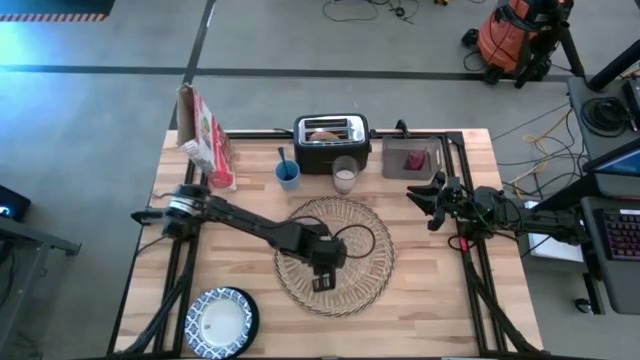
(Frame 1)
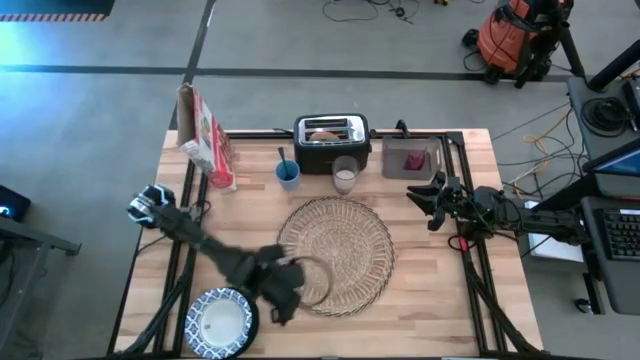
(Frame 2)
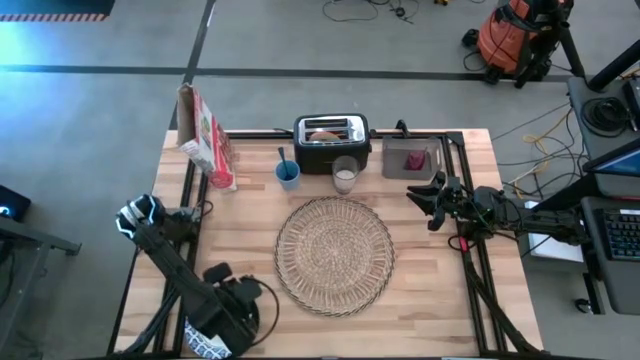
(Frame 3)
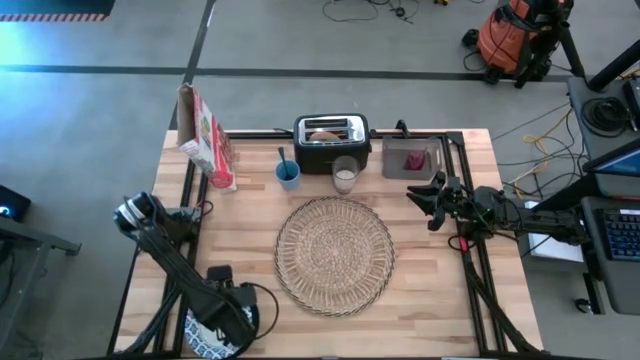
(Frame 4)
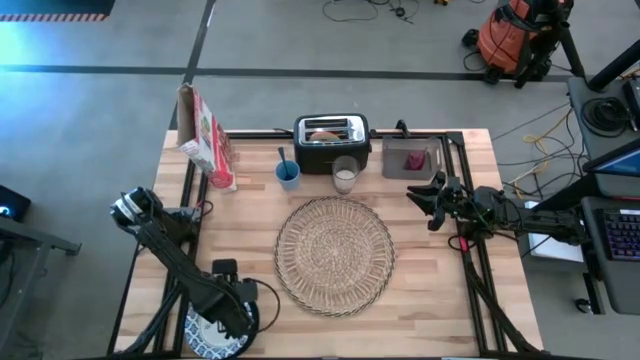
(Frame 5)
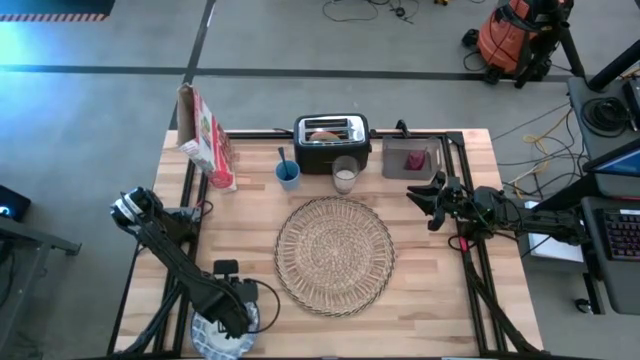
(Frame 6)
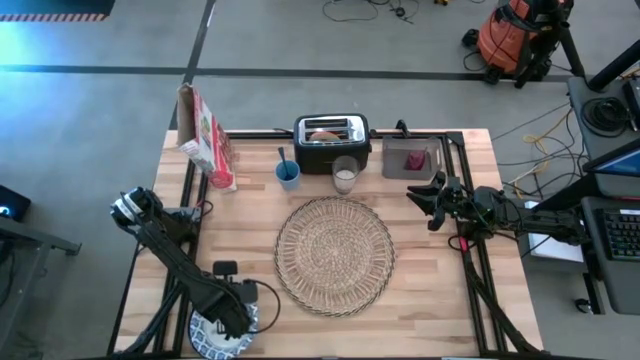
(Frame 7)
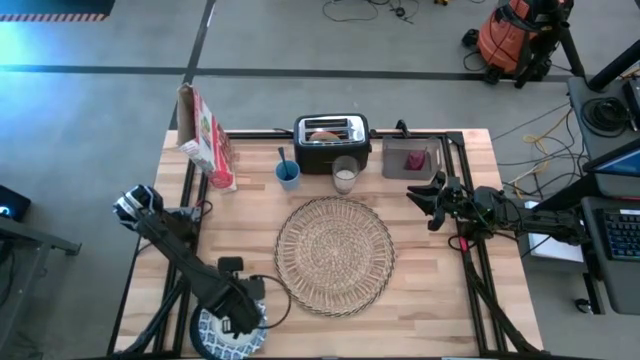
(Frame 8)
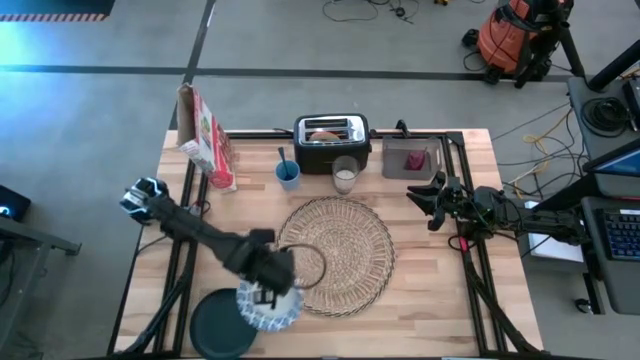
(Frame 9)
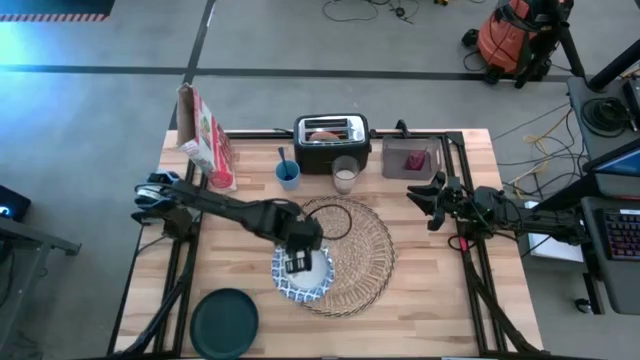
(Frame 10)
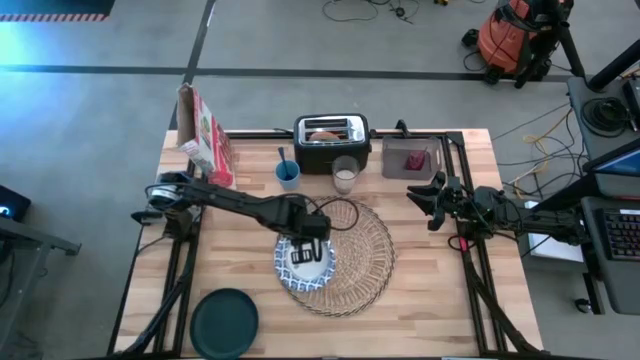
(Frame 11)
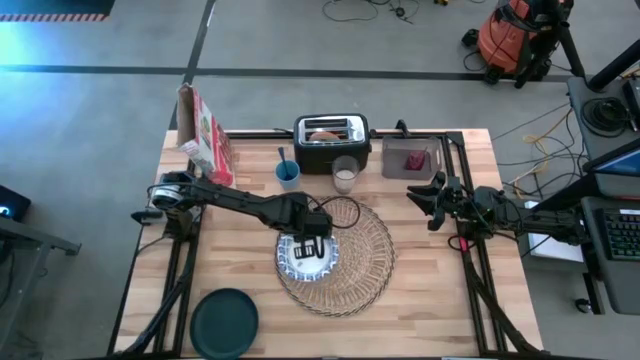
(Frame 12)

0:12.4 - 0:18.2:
Task: Arrange a breakfast setting
Put the white bowl on the brown mat

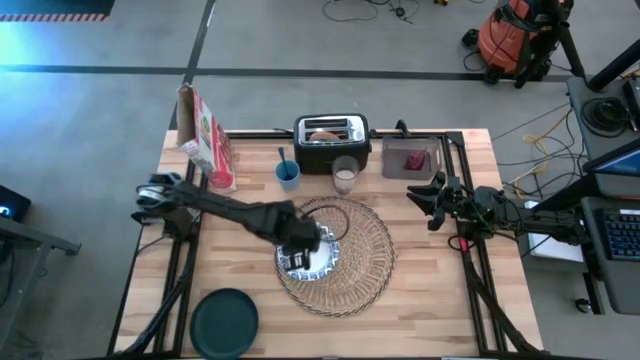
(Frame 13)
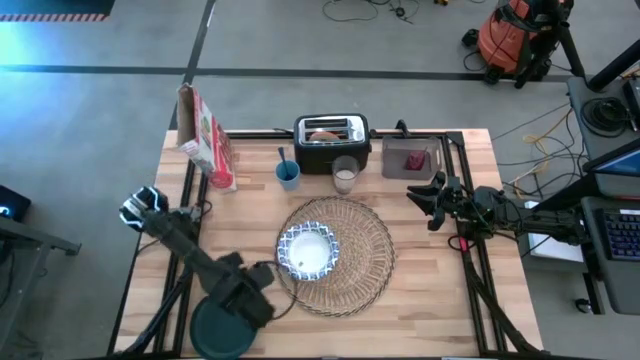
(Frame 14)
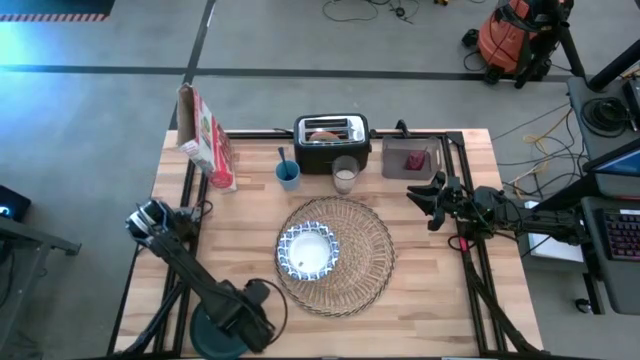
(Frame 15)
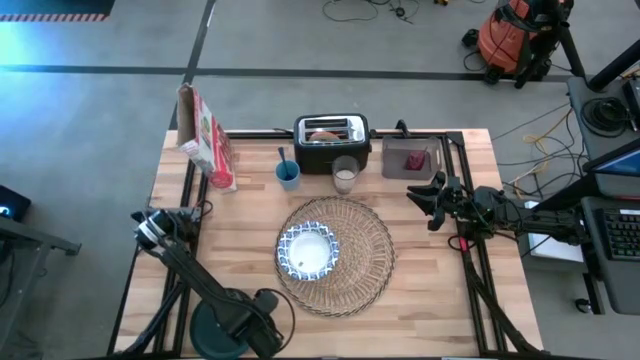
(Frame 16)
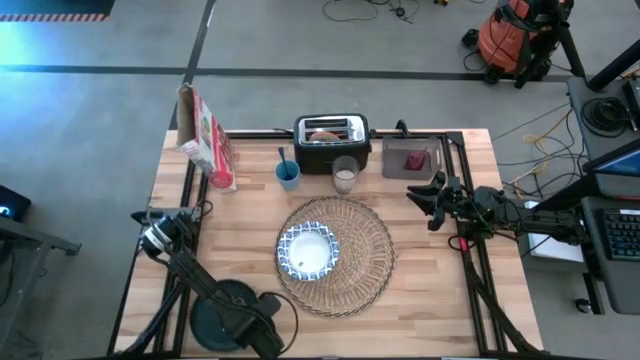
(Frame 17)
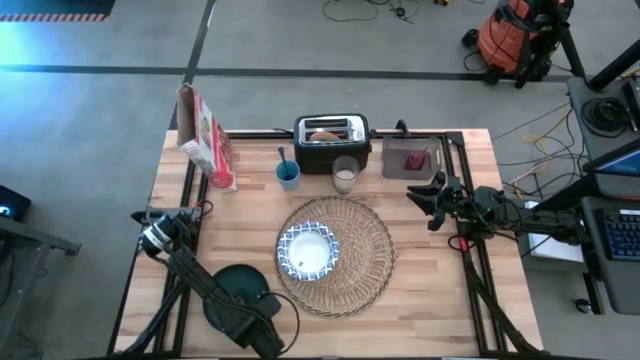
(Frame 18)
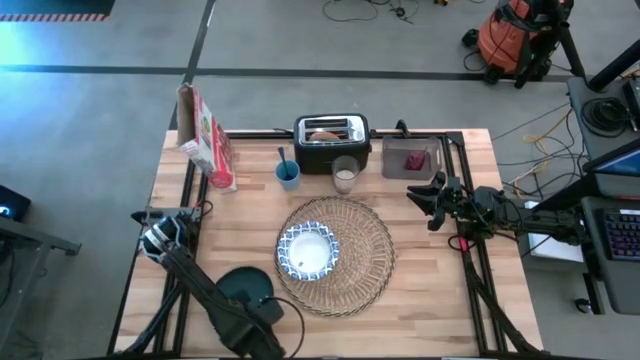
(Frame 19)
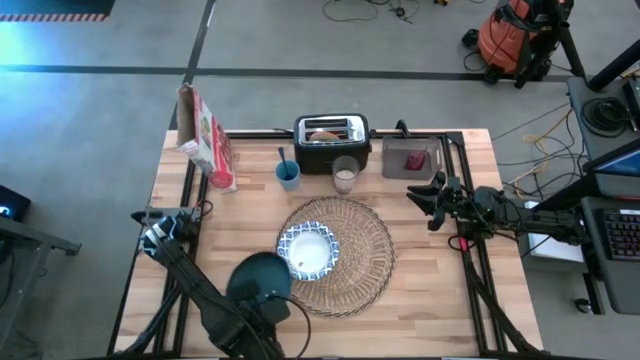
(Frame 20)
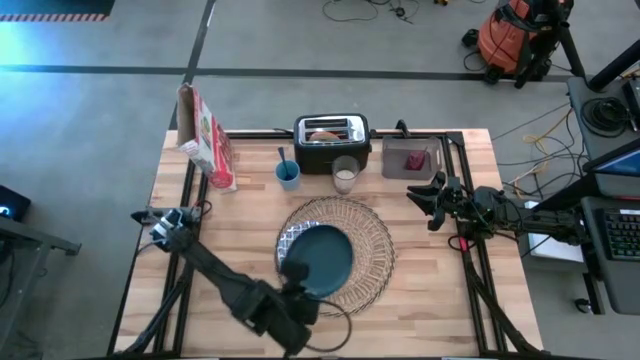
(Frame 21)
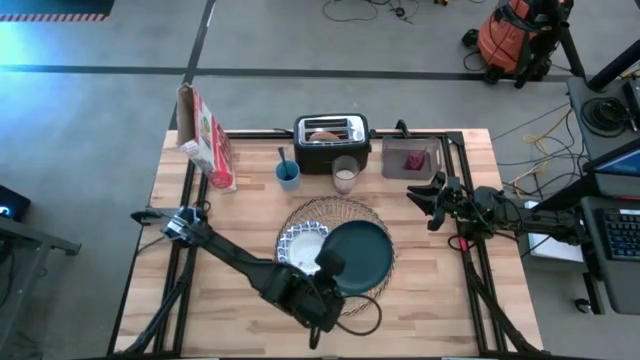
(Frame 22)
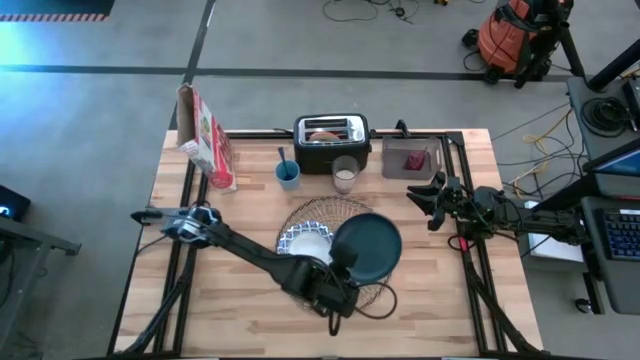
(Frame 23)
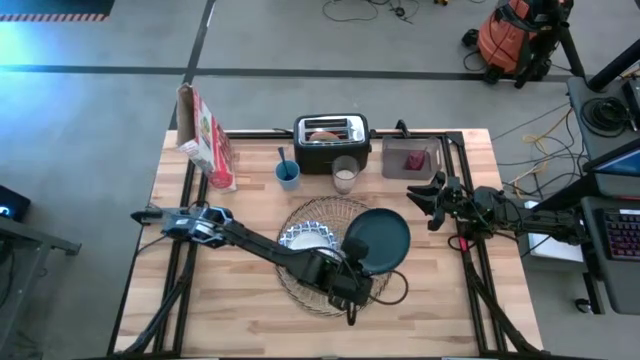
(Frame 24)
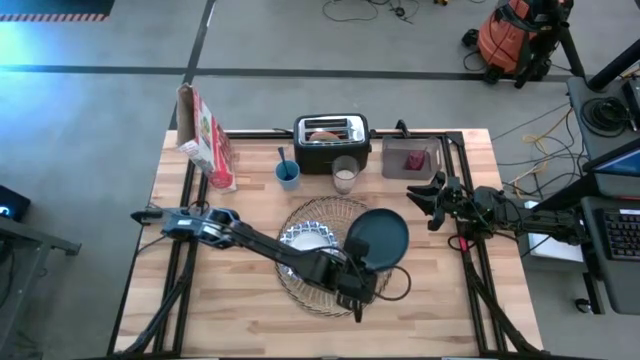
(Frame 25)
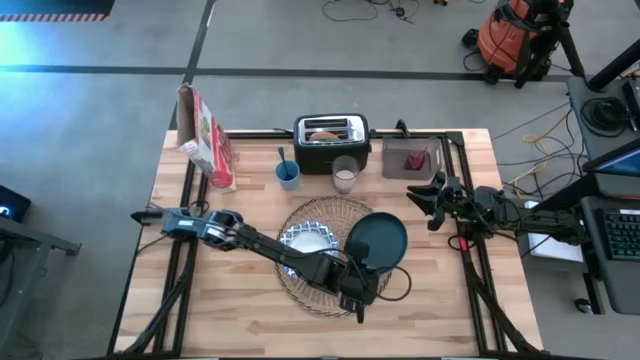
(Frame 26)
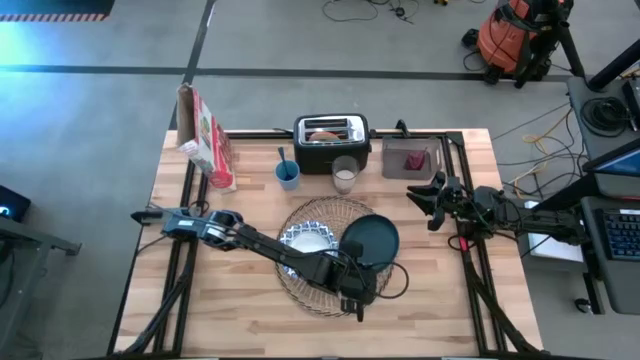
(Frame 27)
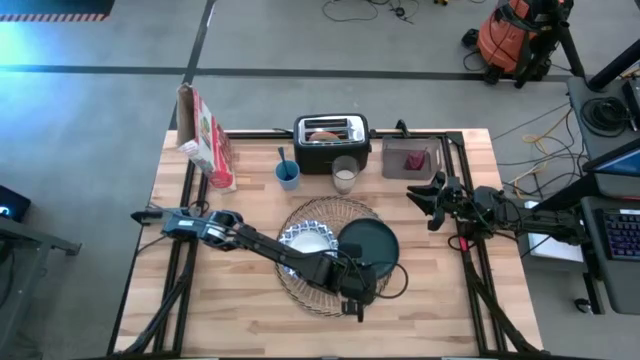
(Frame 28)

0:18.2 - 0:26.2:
Put the black plate on the brown mat

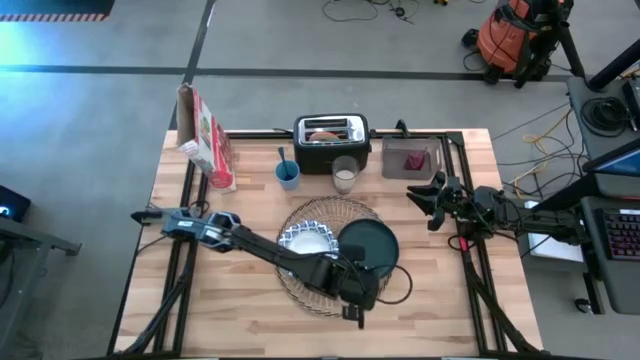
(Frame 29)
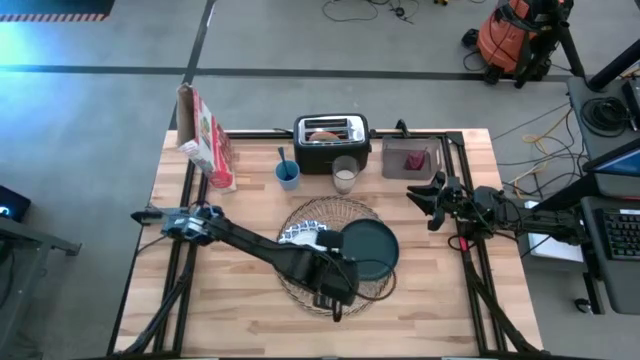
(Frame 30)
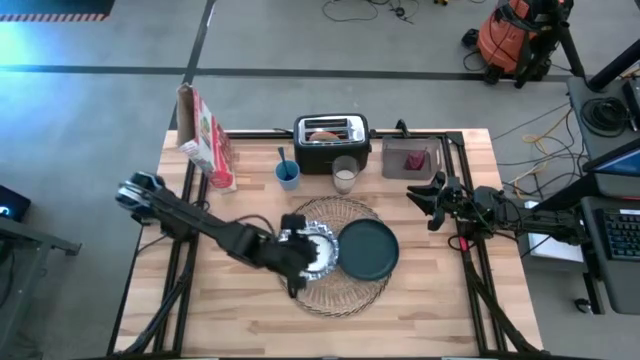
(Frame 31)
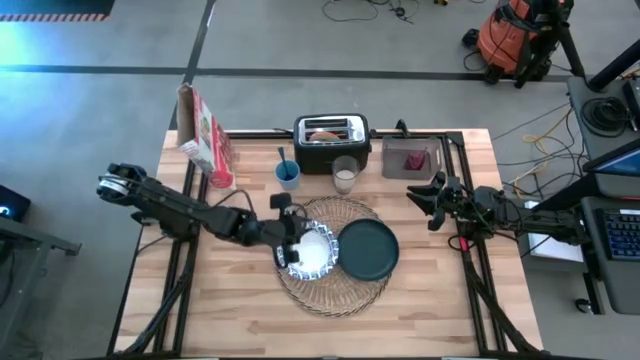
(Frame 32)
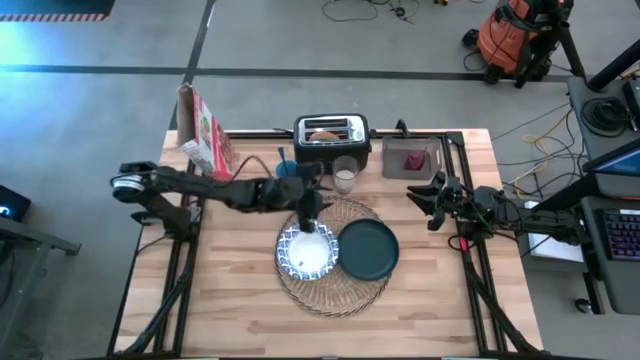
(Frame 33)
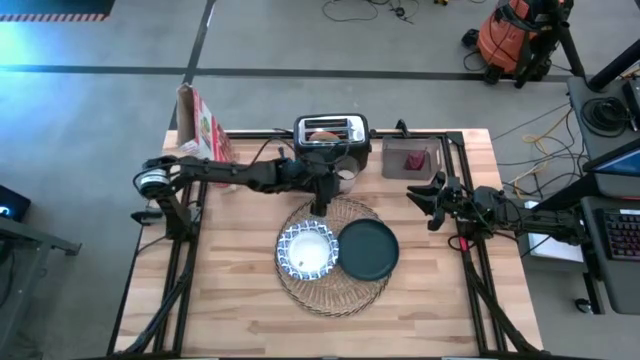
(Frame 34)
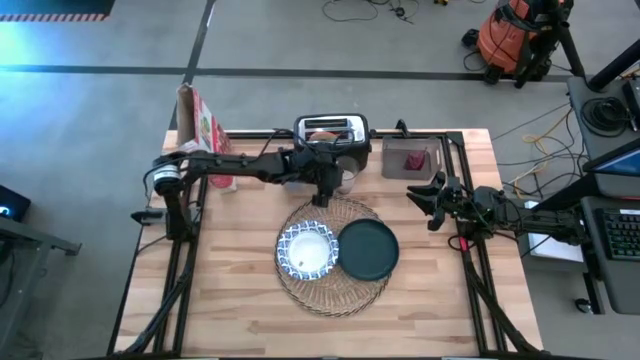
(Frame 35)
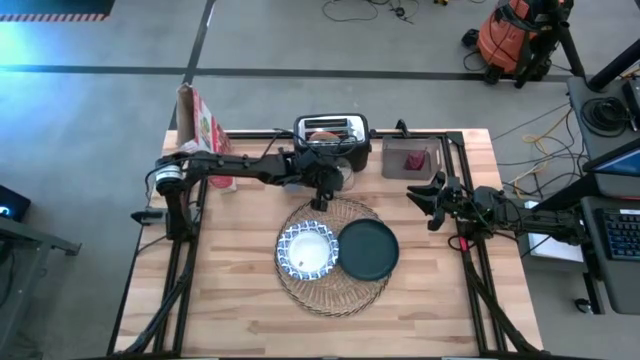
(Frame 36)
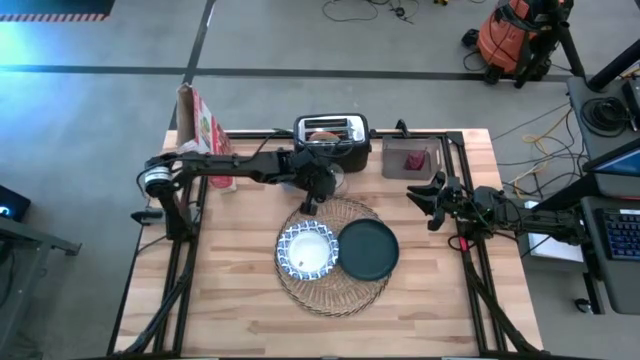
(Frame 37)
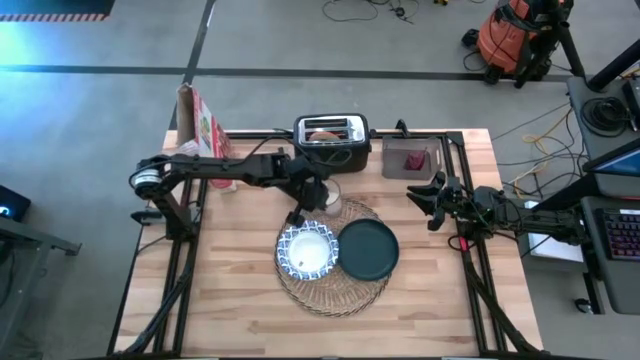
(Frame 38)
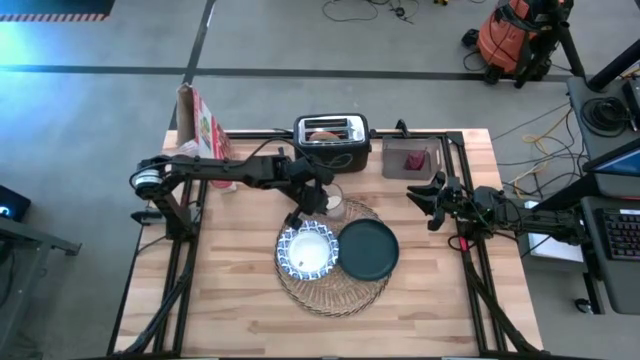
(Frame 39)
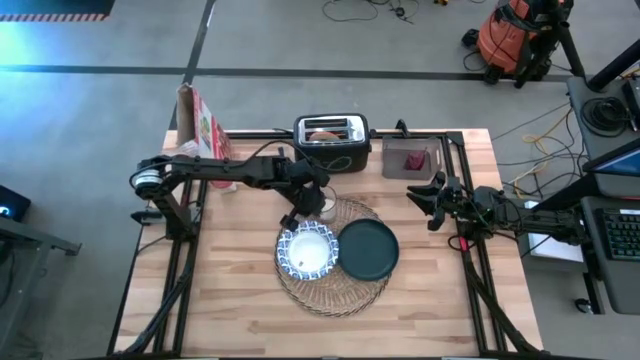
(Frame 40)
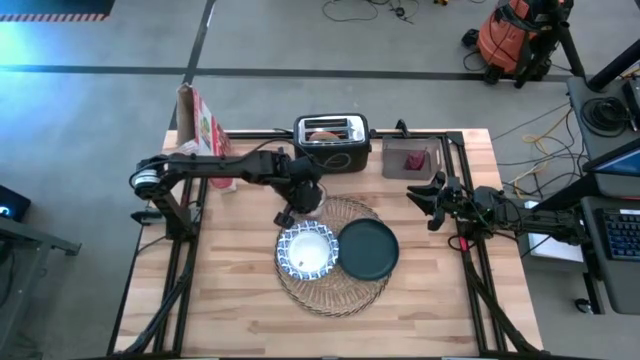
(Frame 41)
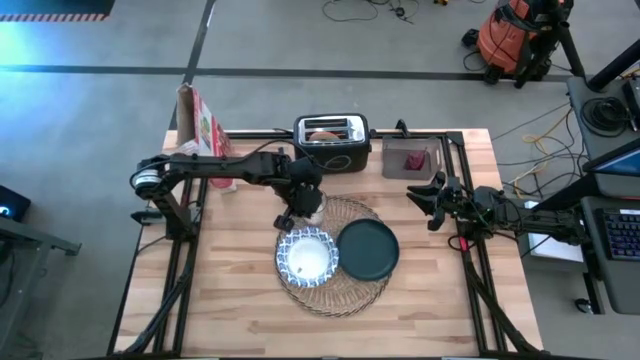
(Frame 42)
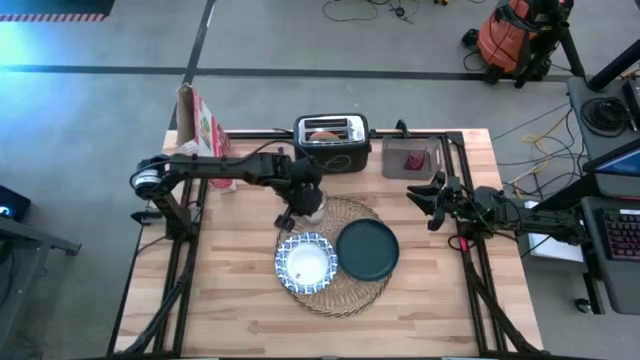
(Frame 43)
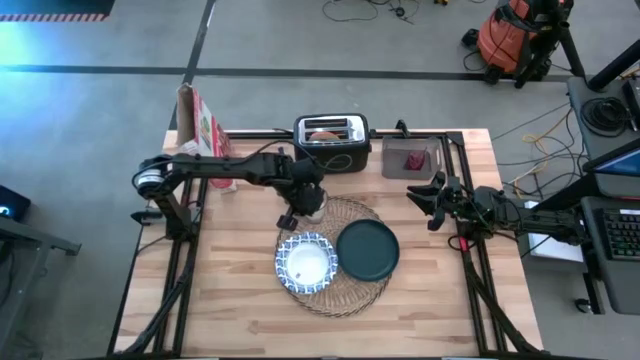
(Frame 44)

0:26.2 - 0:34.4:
Put the transparent cup on the brown mat

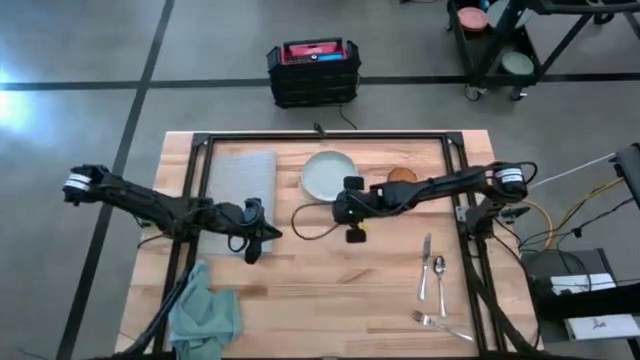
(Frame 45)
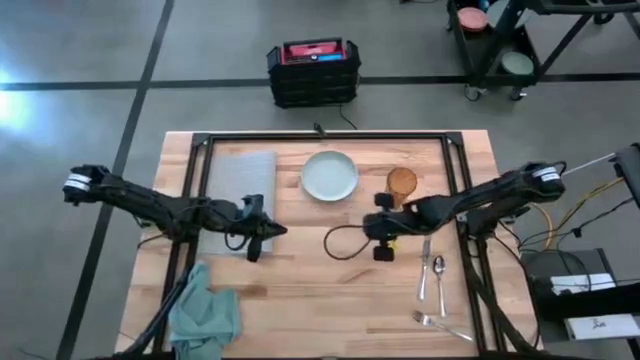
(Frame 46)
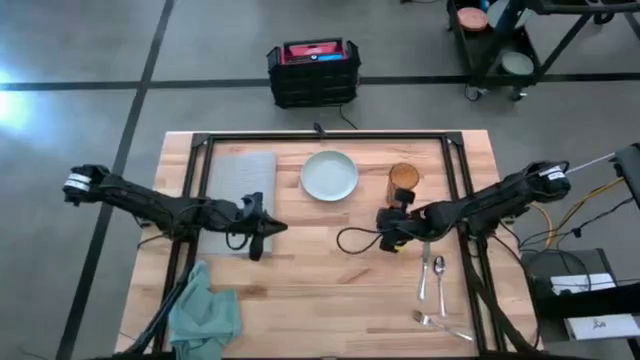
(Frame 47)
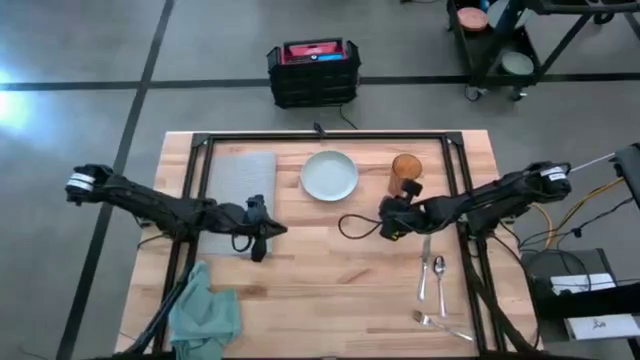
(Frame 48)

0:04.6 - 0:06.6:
Task: Set table place
Adjust the cup
